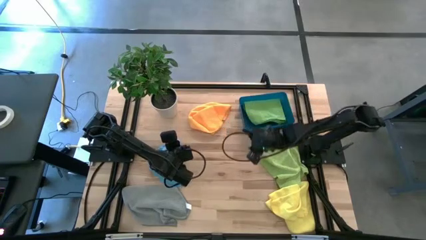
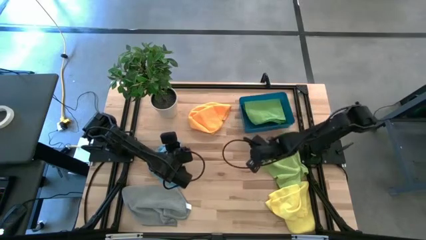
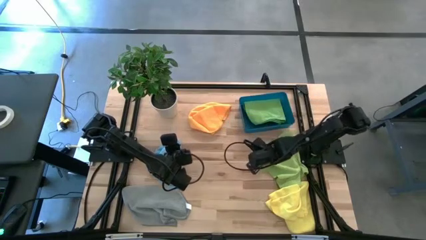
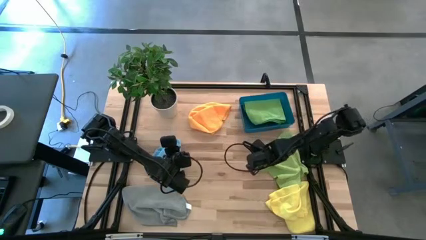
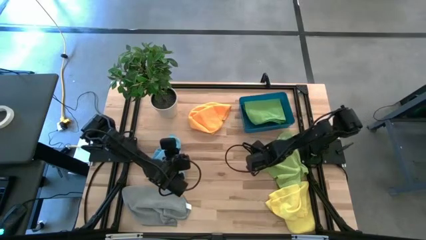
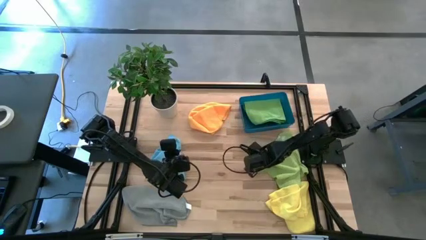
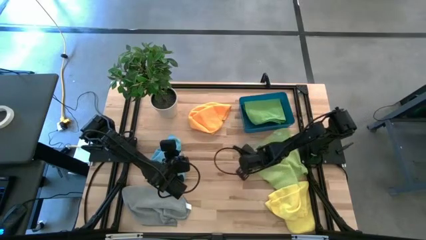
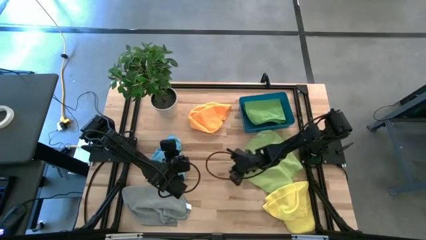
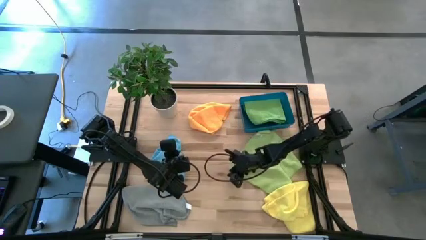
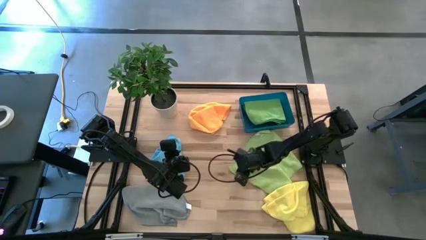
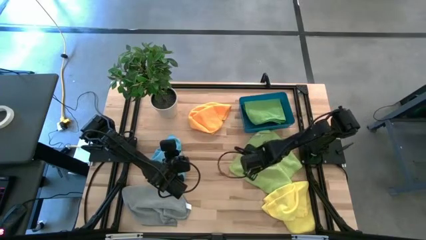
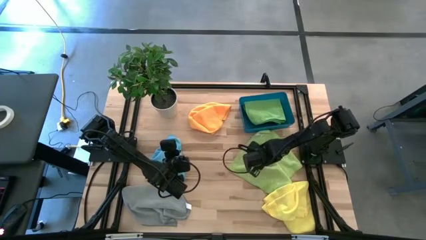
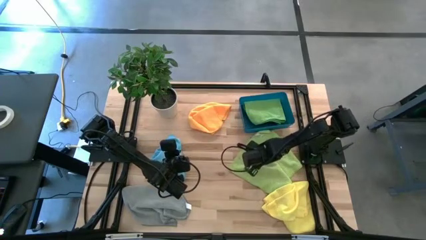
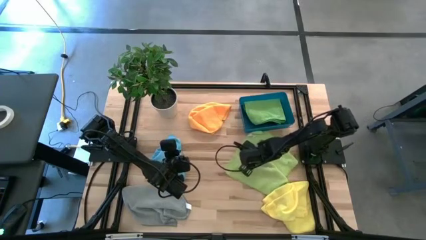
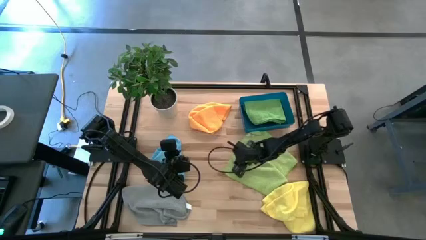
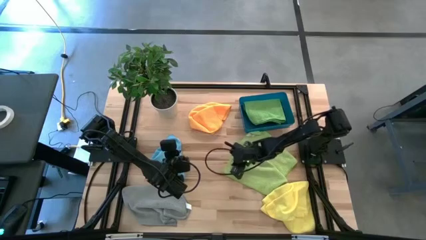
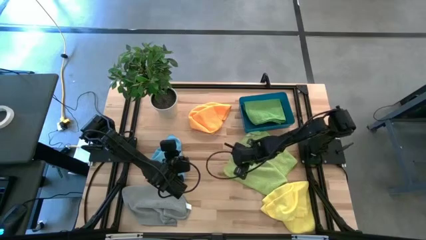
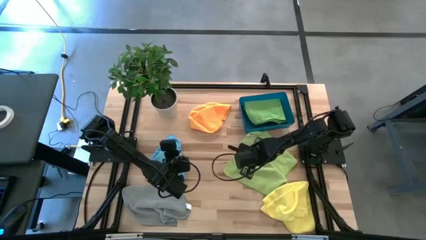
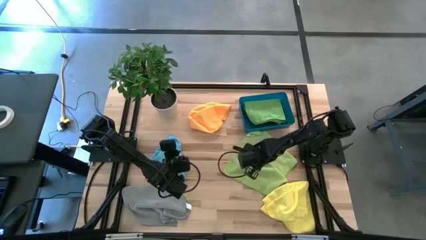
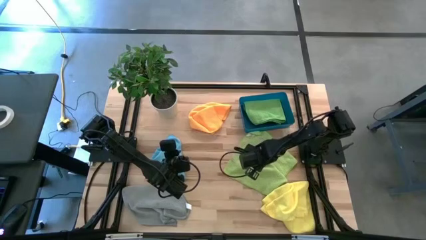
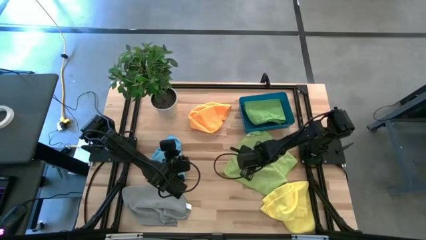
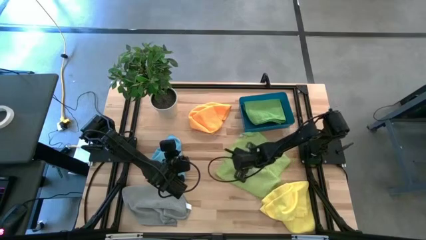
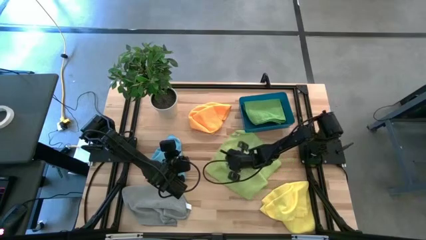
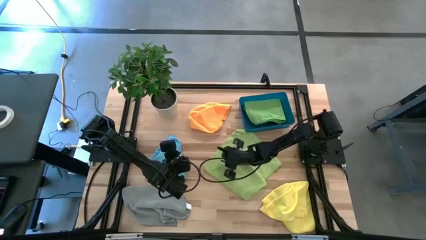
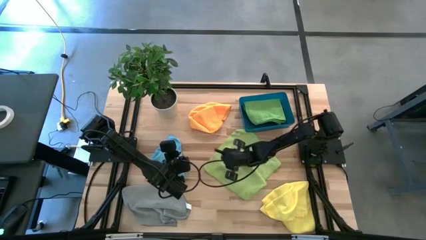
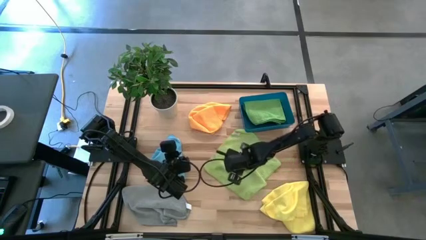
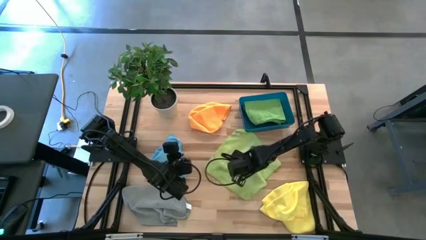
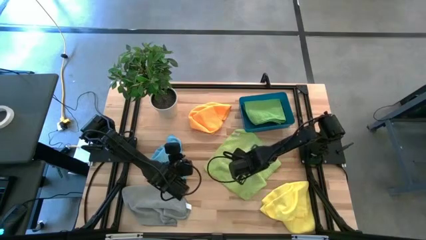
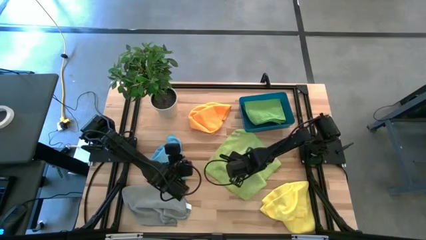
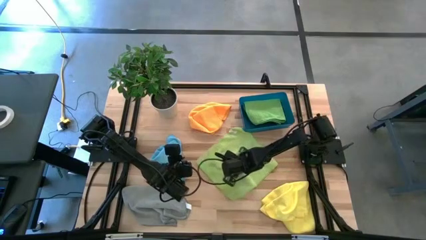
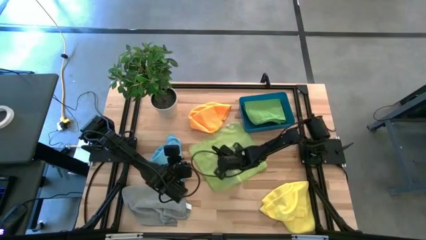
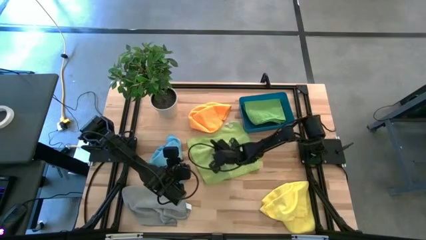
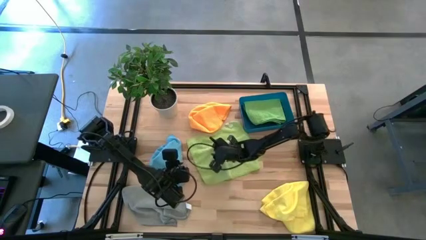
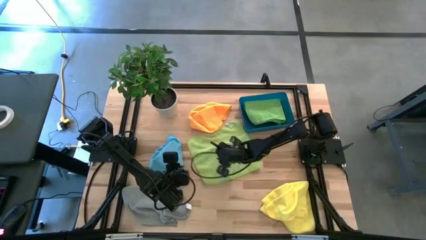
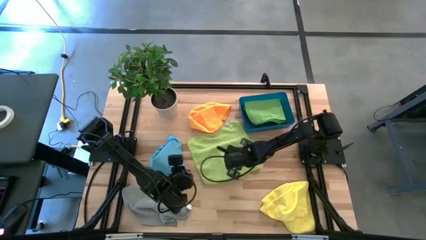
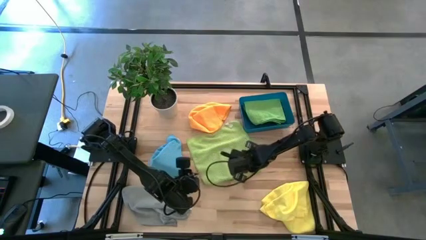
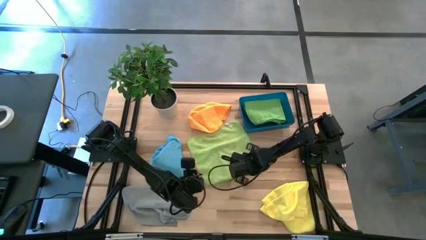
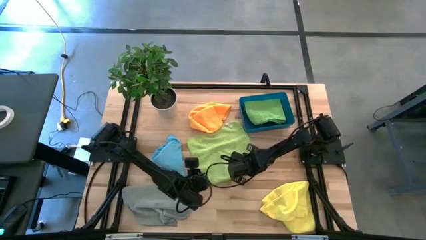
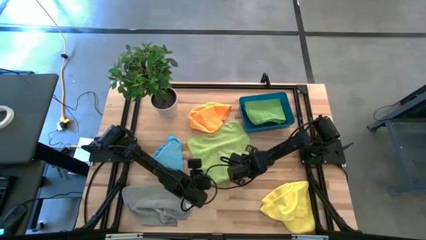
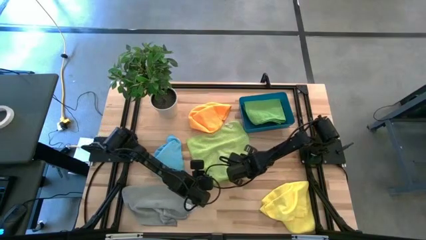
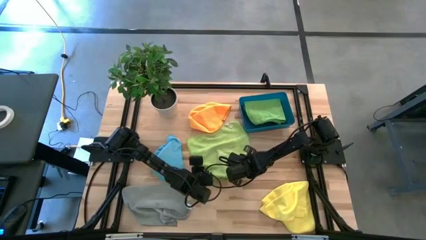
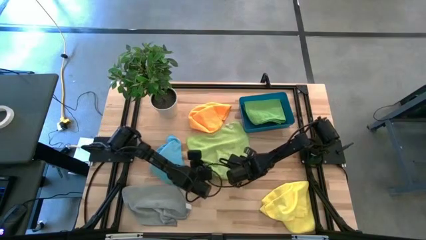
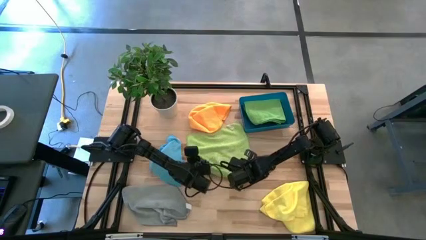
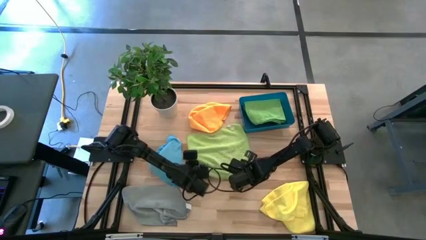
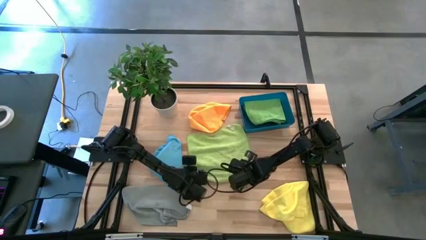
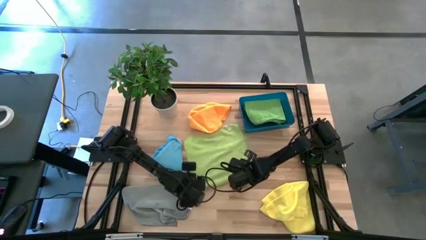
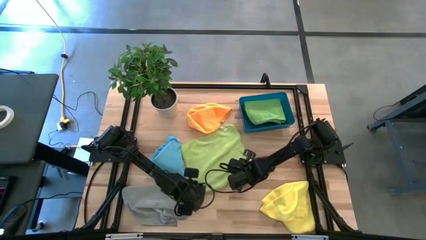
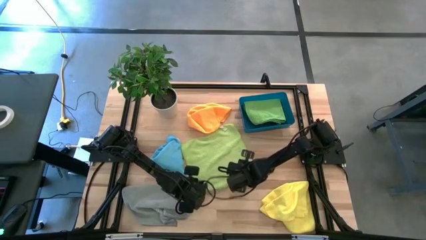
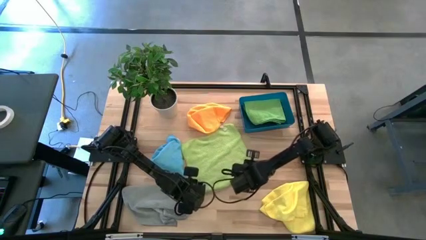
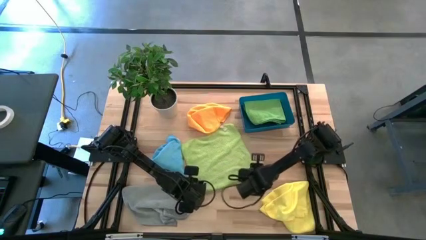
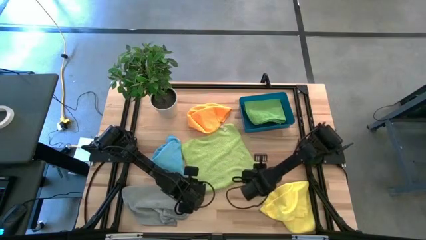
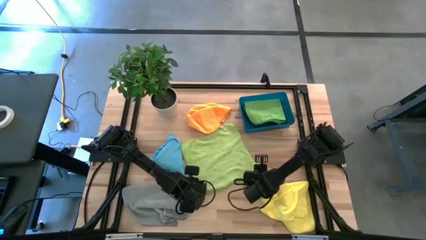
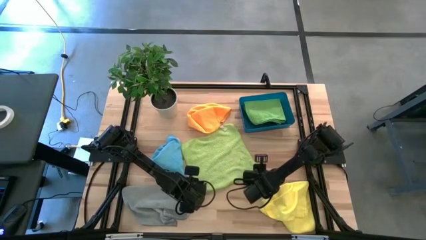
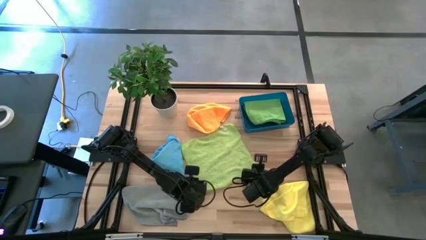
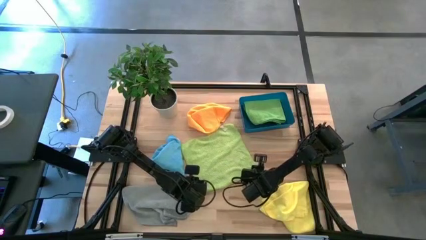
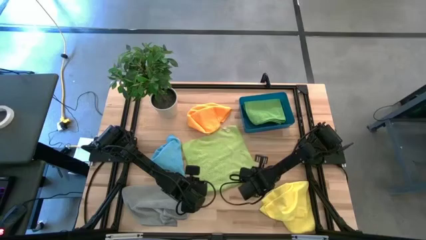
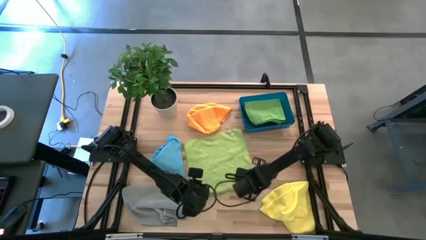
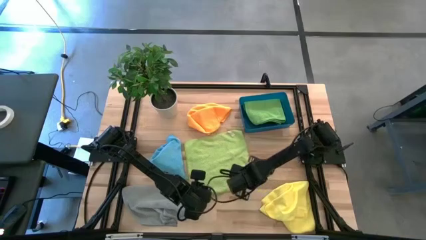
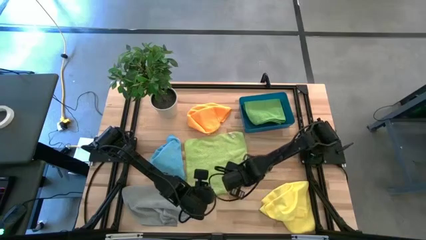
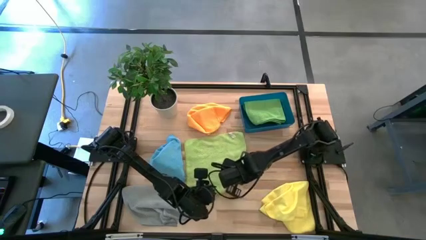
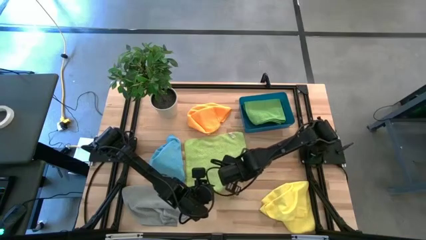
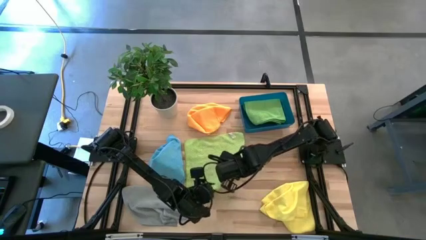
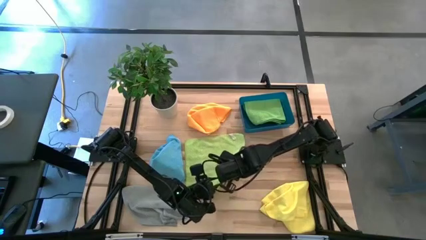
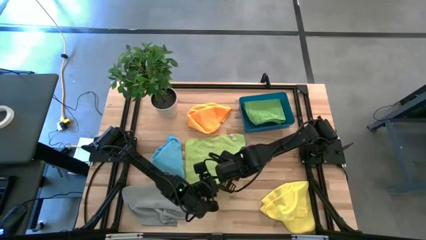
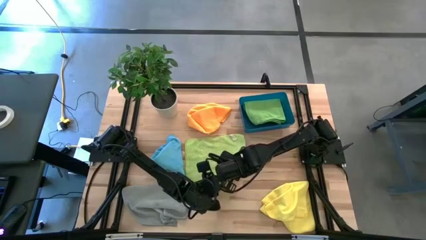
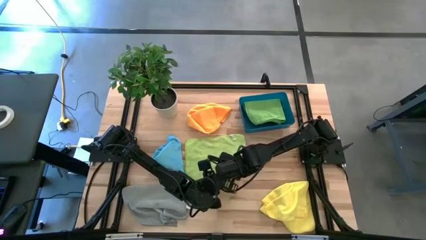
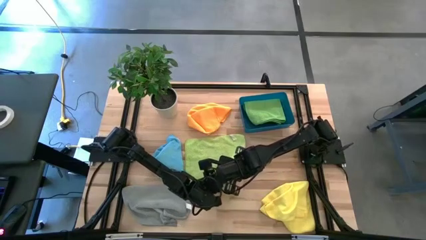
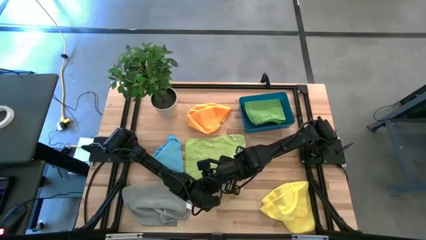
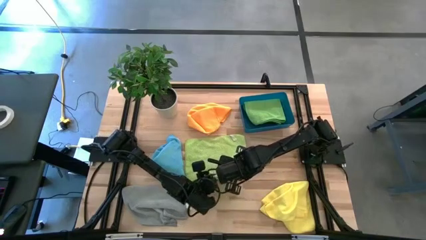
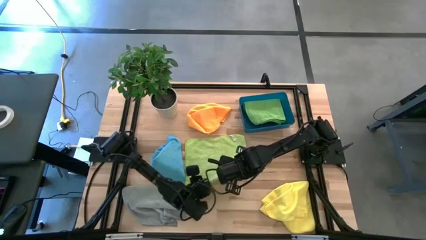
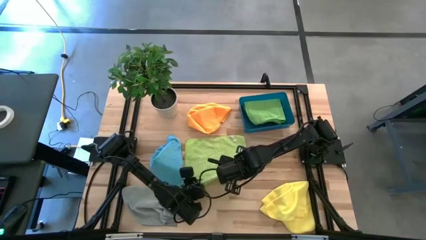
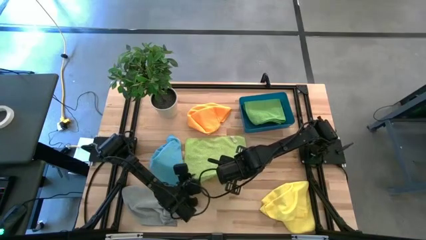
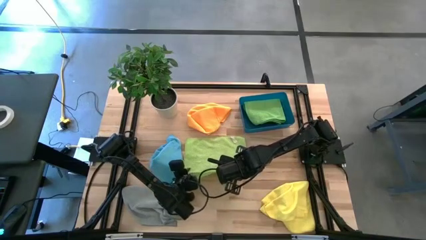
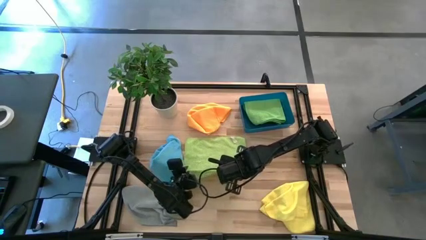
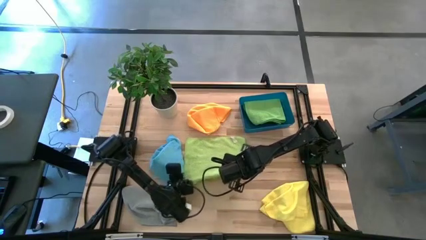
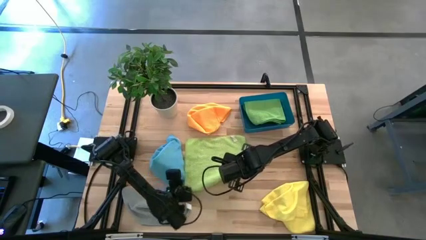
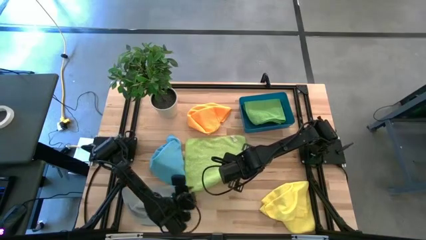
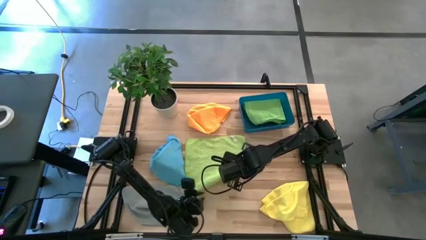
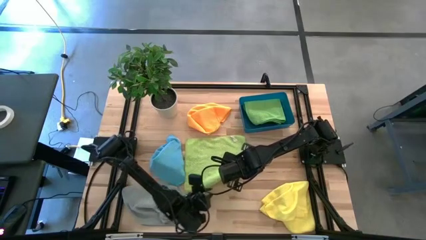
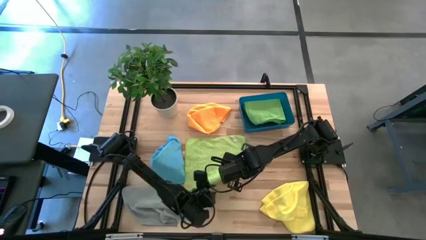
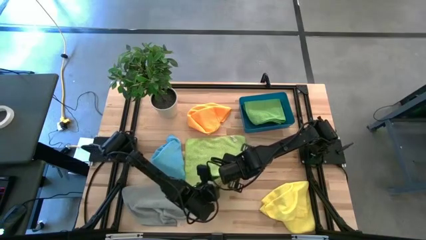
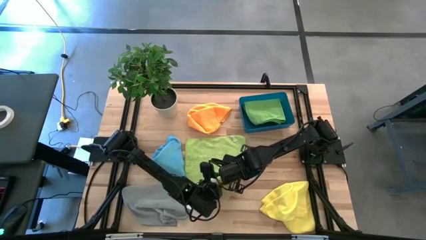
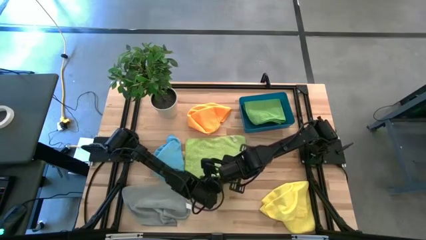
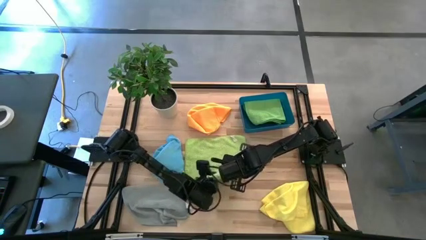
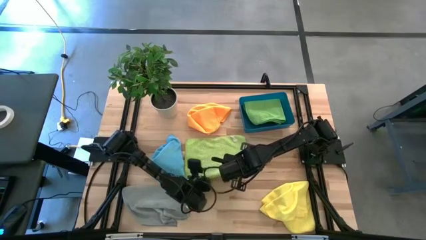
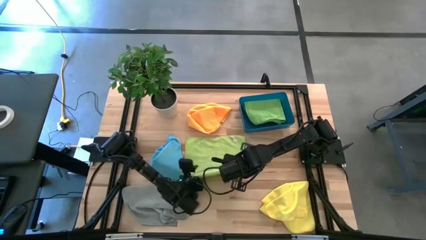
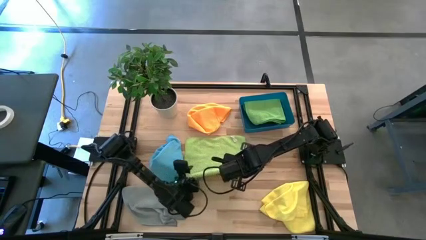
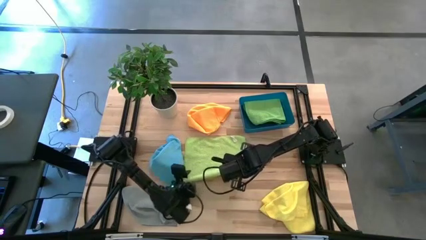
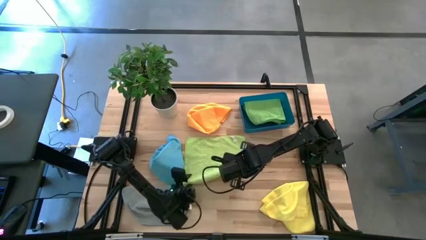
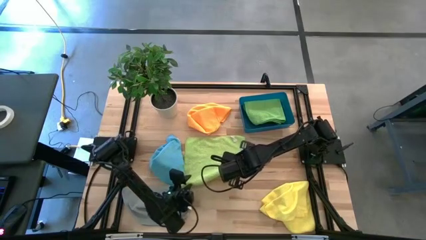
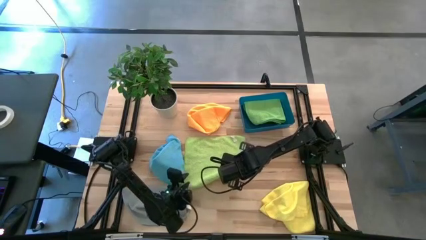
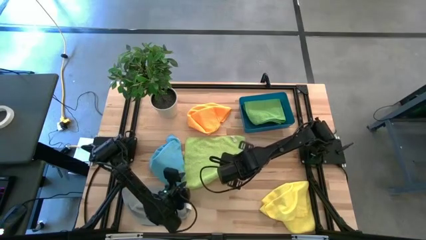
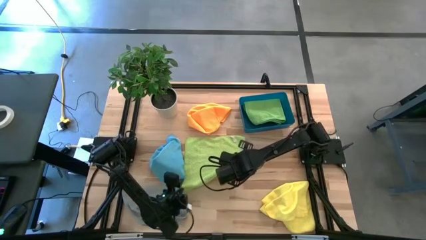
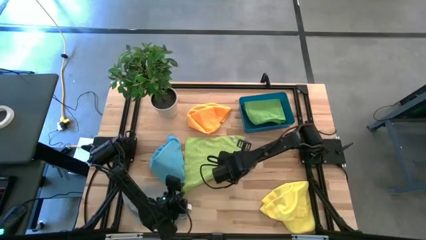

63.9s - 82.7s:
Task: Fold microfiber towels
Fold the light green microfiber cloth
